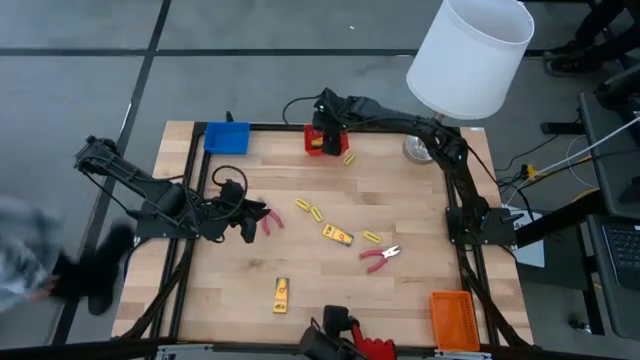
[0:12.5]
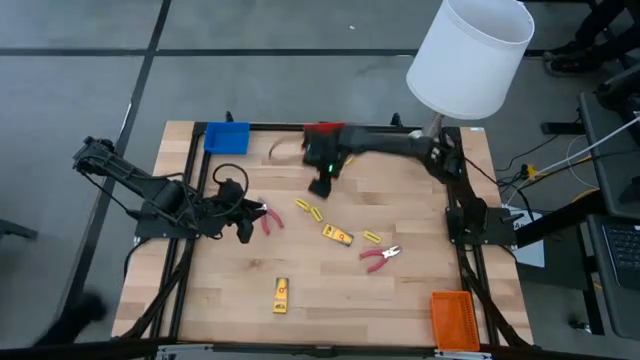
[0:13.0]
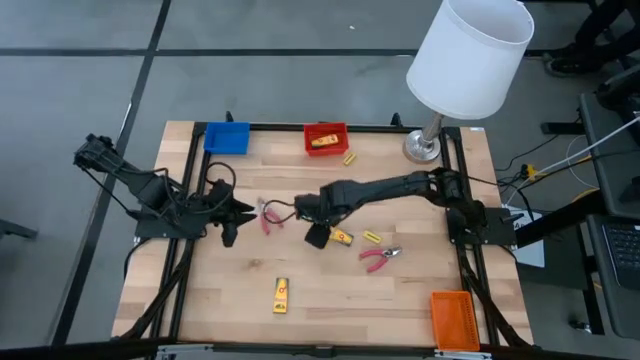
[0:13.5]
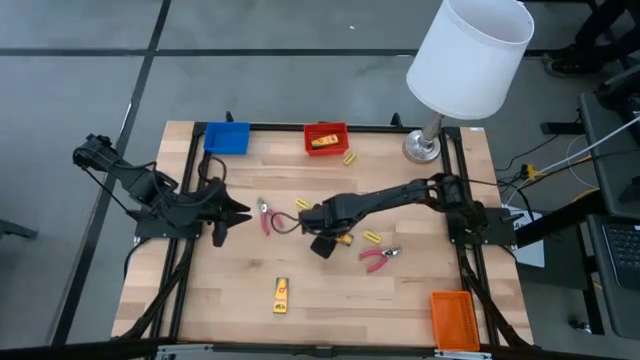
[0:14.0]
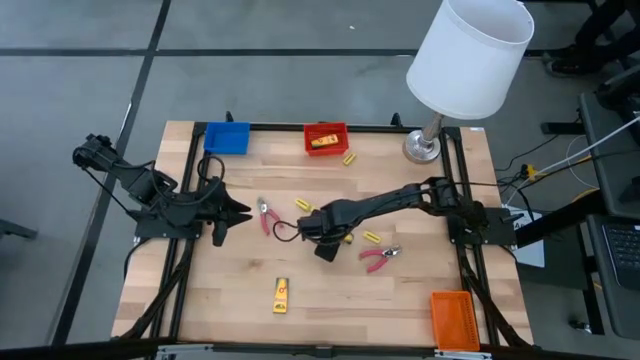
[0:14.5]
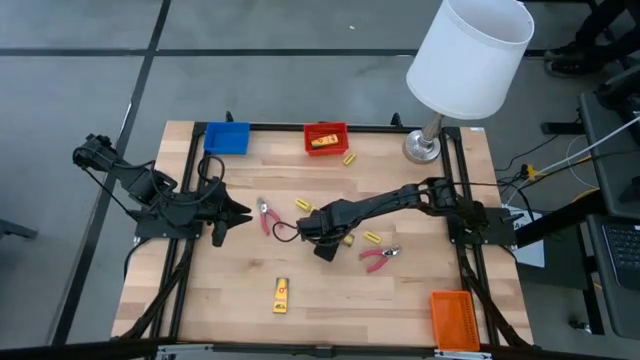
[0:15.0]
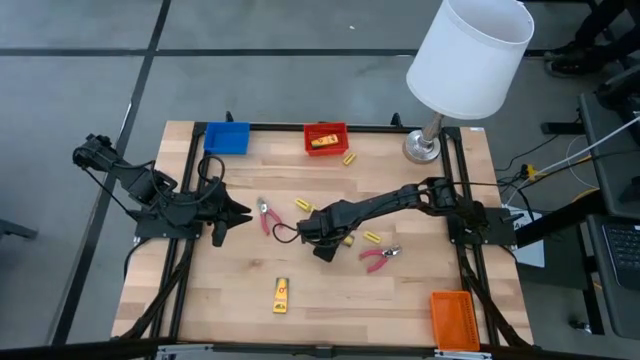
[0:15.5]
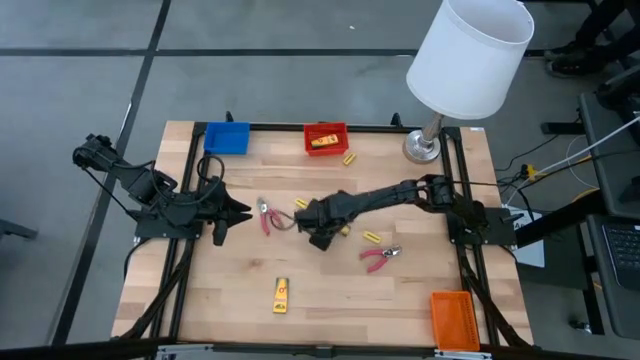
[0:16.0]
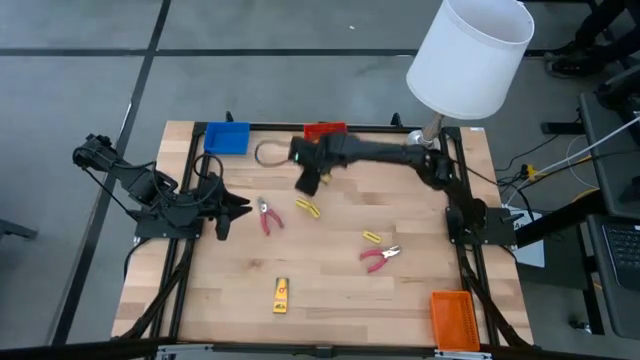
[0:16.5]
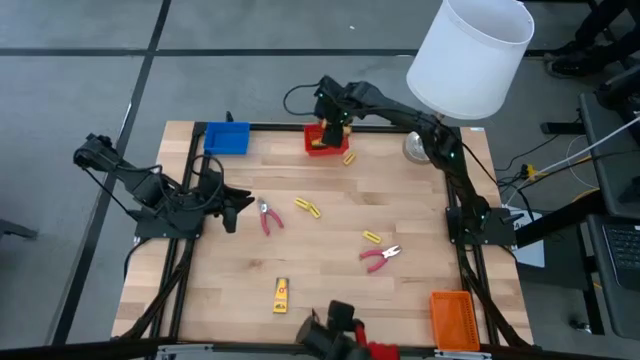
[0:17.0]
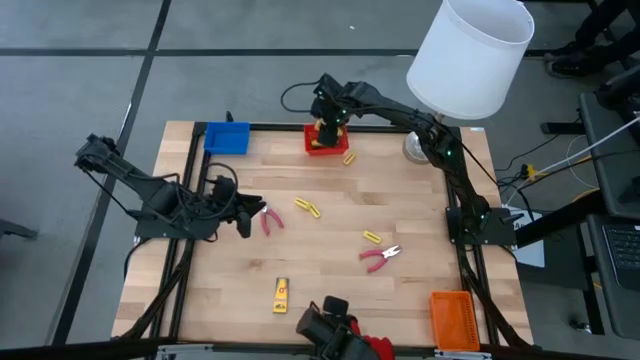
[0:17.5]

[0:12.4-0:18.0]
Task: Pick & Place School Supplies
Put the yellow crayon box into the red bin

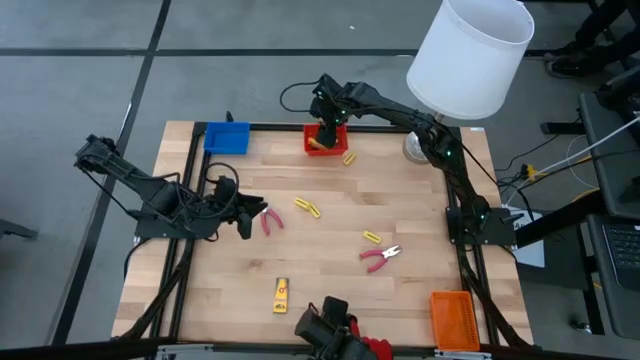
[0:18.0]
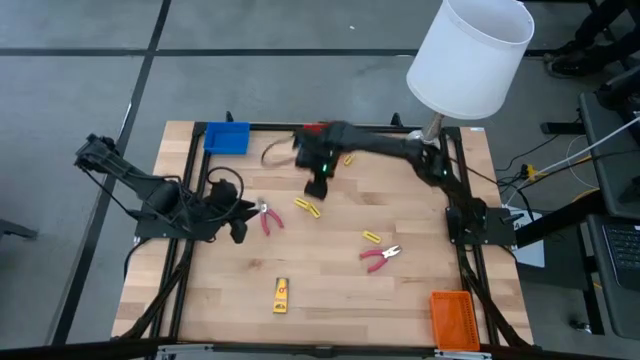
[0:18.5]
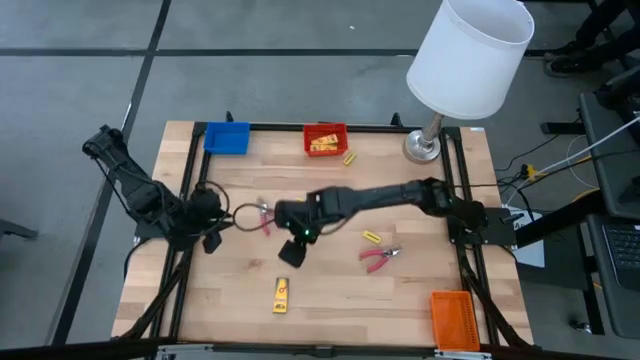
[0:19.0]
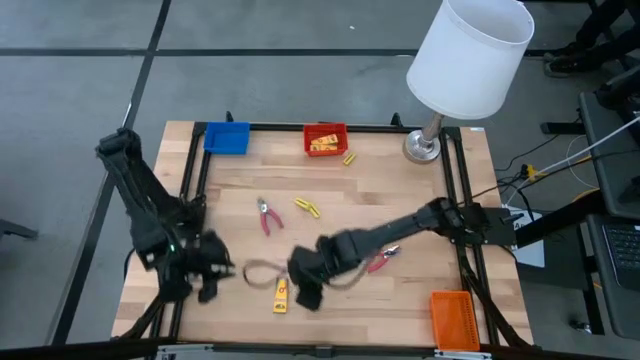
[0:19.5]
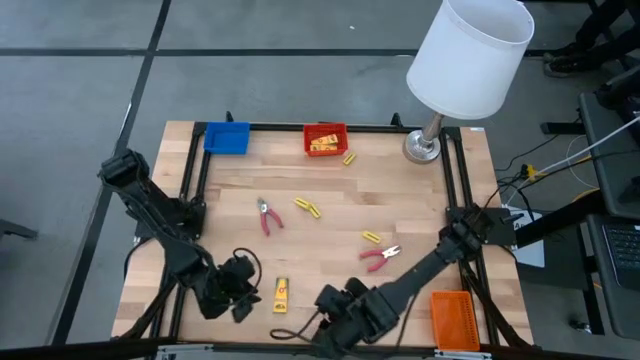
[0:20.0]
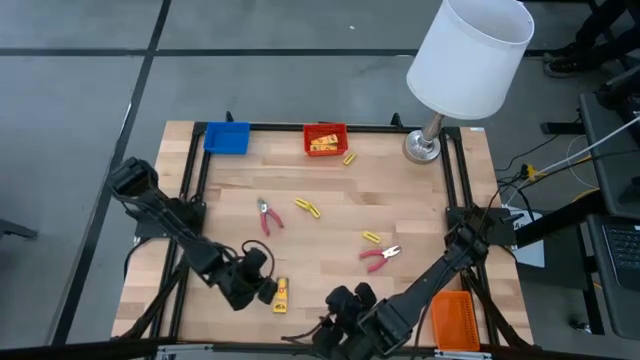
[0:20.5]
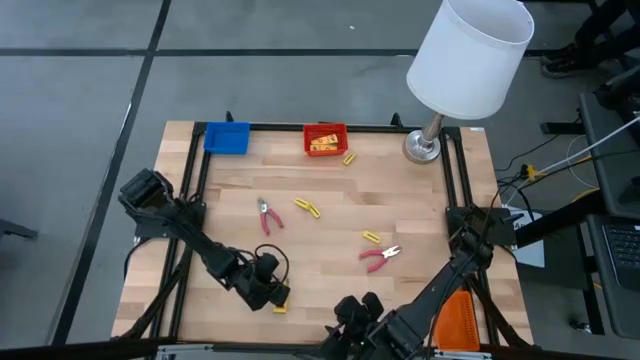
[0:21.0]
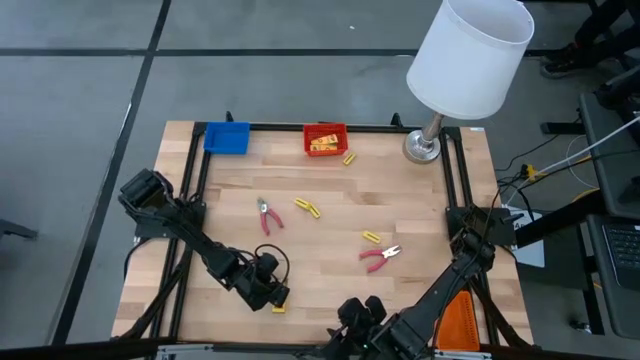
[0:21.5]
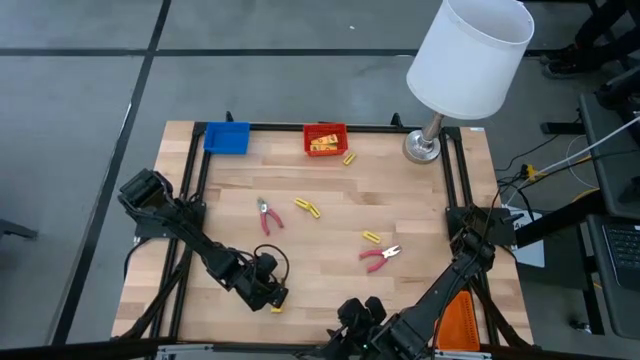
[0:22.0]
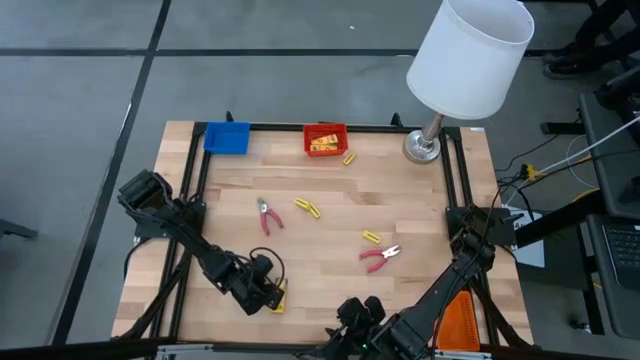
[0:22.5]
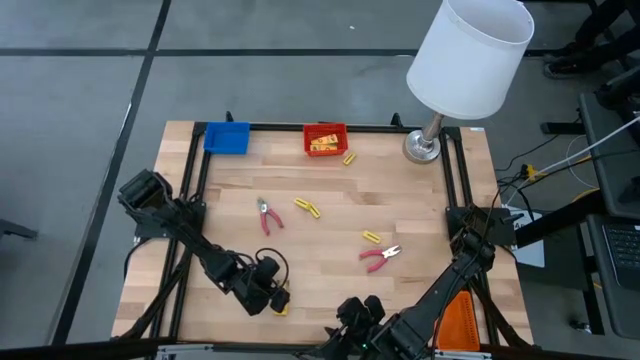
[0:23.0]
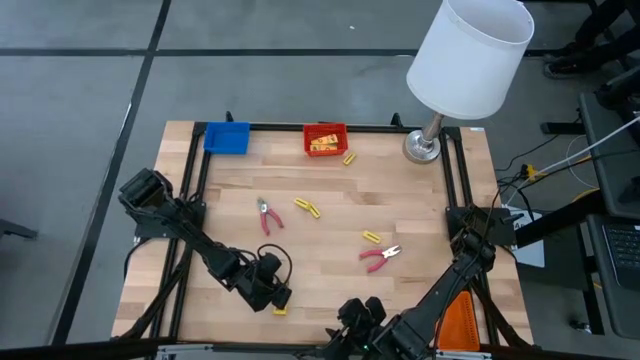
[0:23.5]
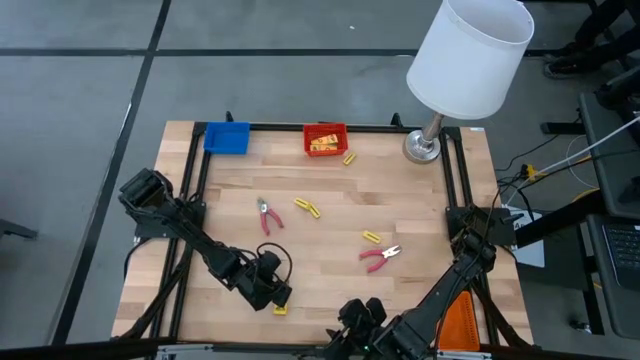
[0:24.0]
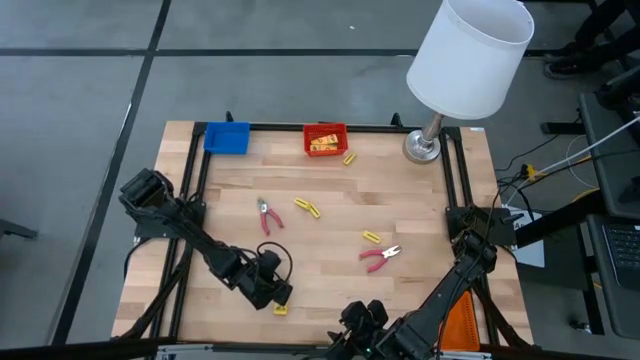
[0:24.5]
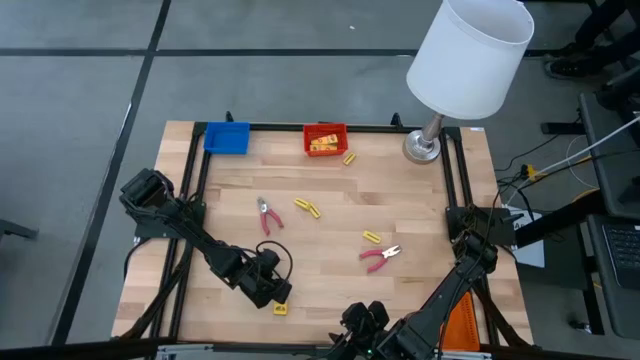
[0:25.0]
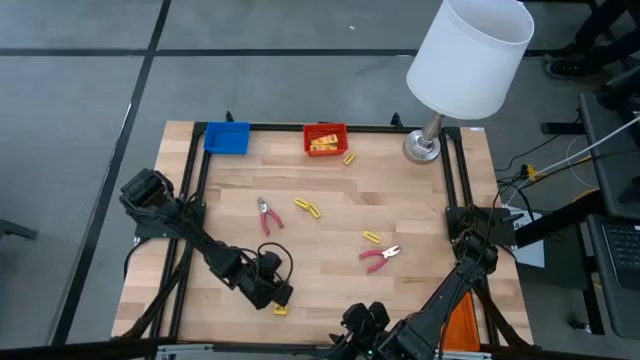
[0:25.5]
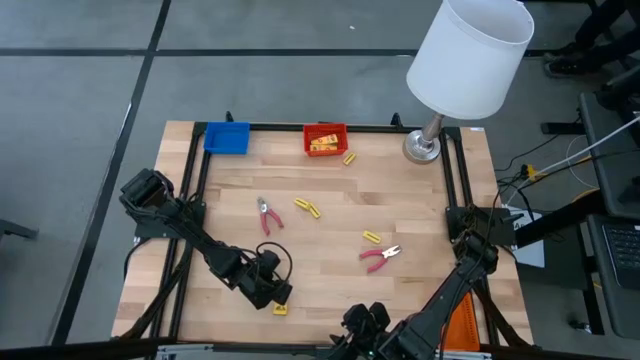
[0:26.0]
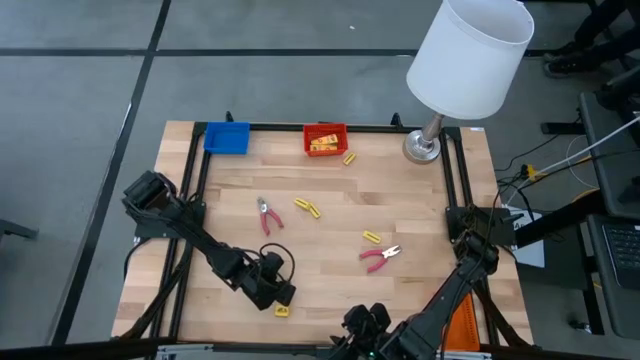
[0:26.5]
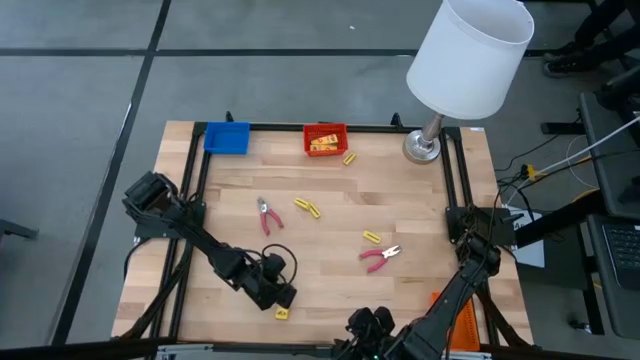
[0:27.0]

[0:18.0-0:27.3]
Put the yellow crayon box into the red bin

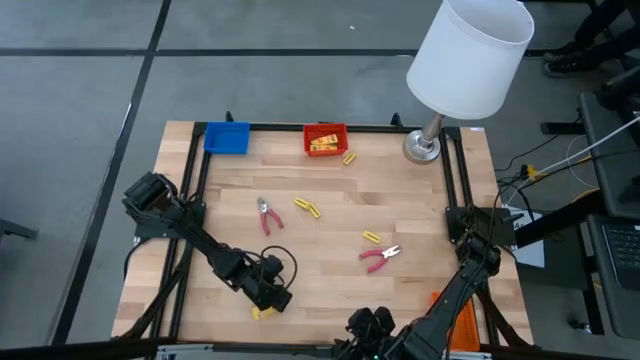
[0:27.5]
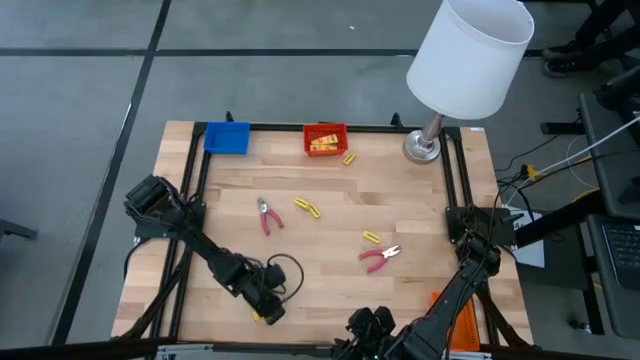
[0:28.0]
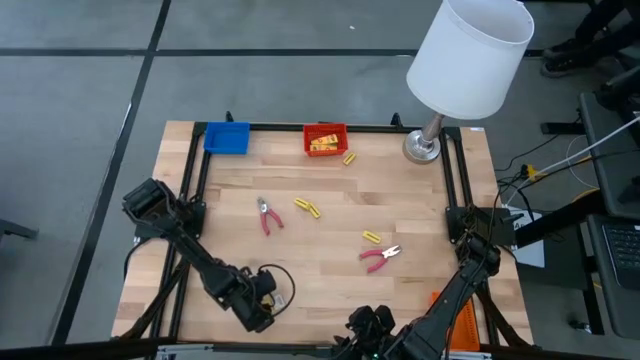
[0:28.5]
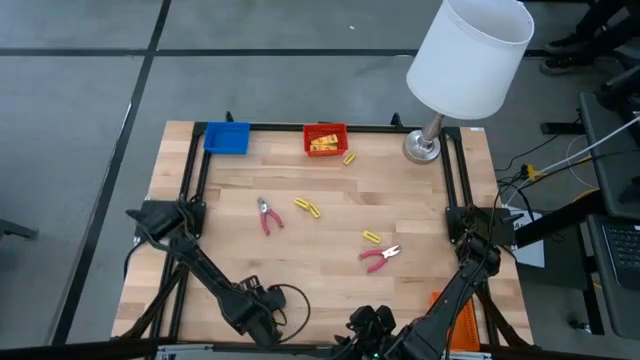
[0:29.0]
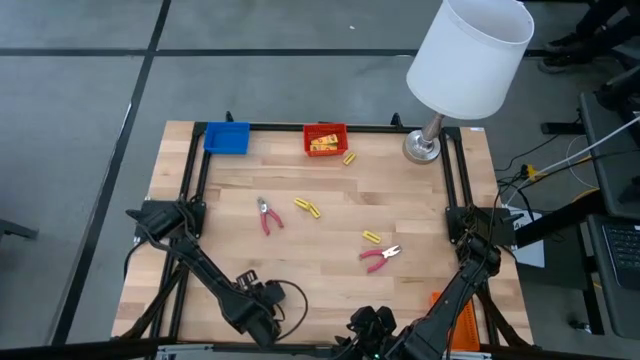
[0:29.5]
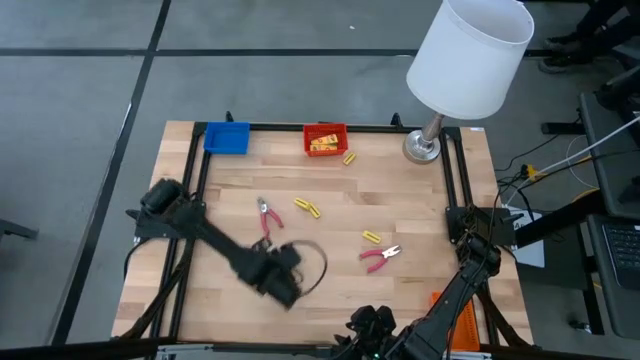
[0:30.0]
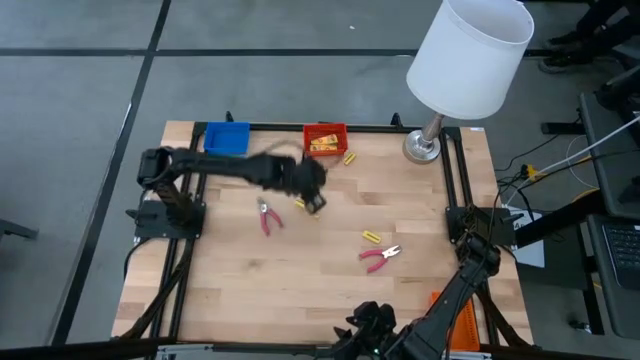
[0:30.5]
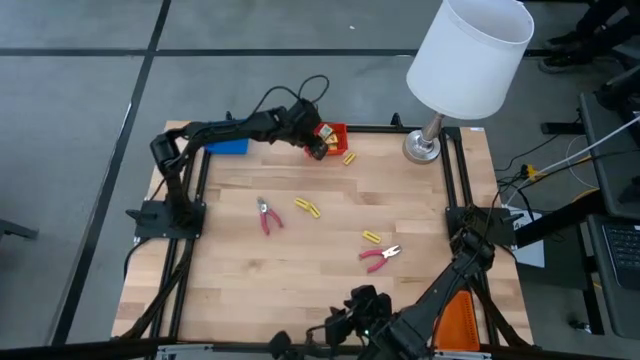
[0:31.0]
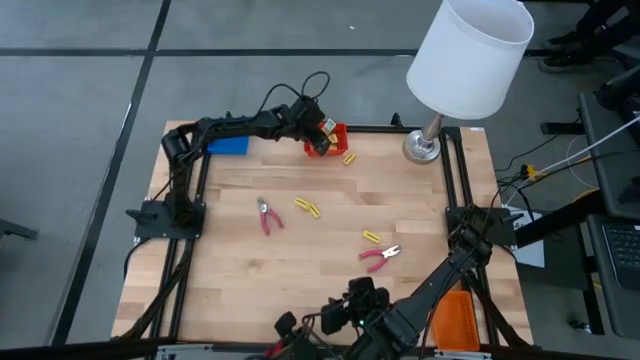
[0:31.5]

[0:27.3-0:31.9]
Put the yellow crayon box into the red bin

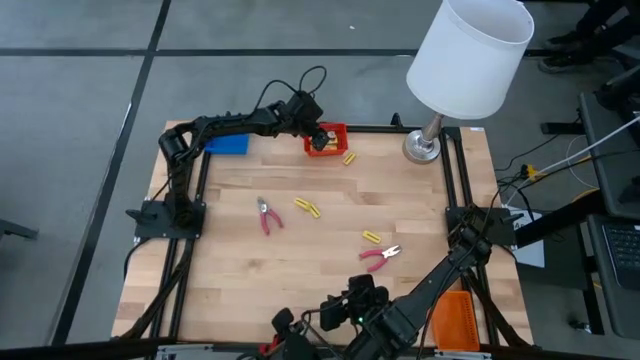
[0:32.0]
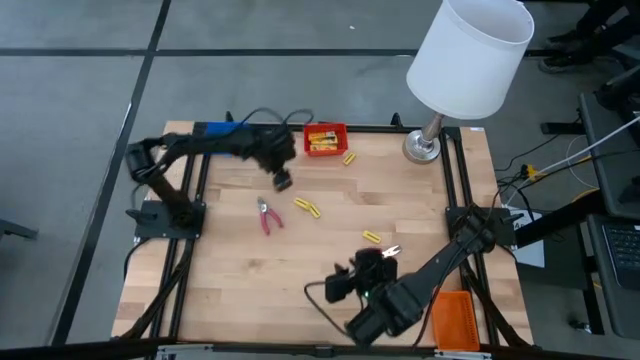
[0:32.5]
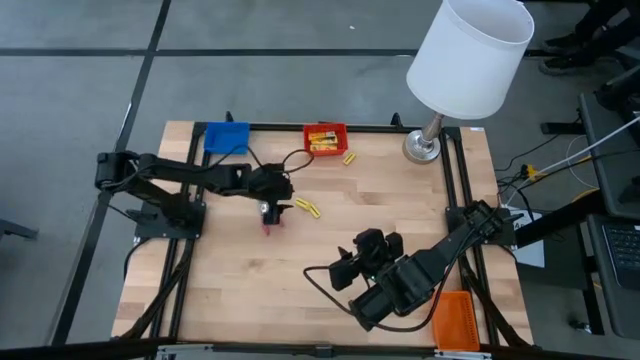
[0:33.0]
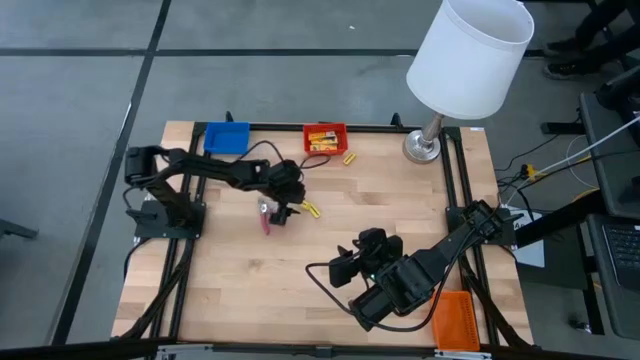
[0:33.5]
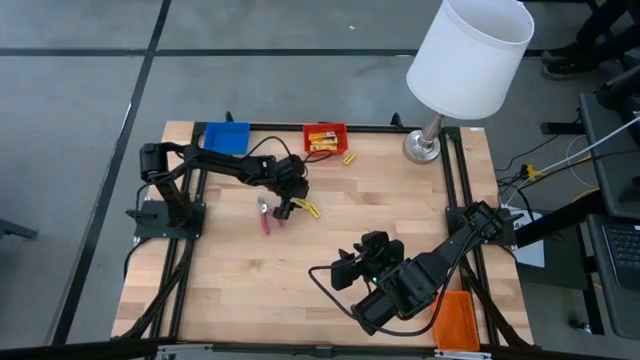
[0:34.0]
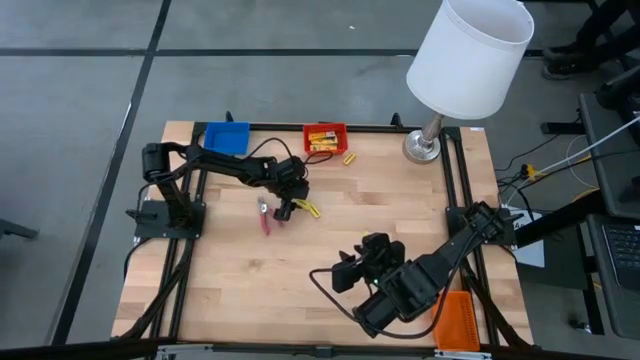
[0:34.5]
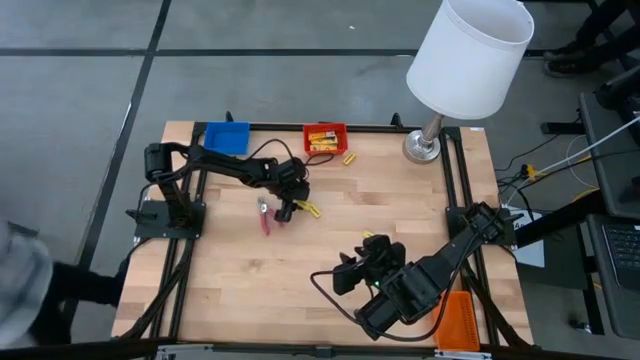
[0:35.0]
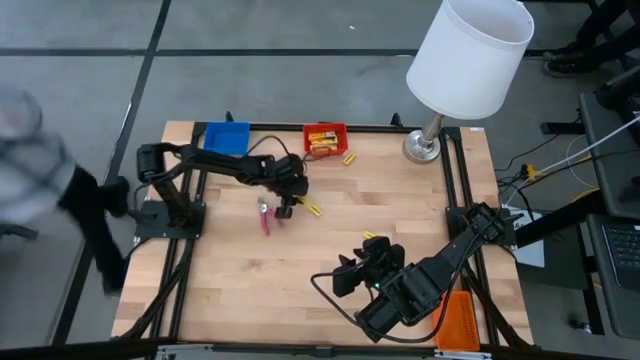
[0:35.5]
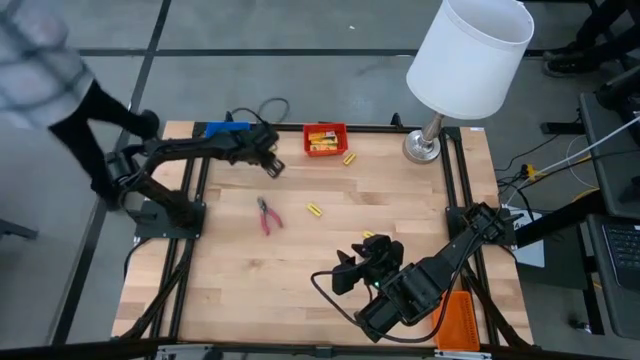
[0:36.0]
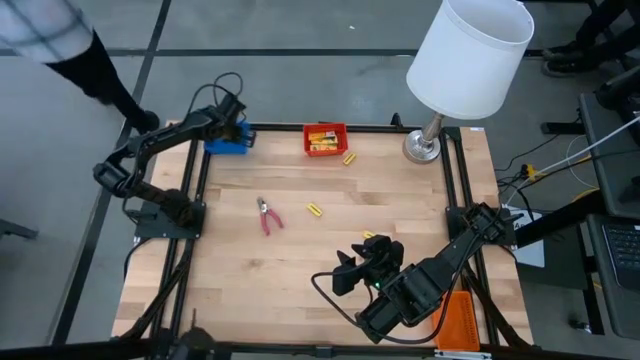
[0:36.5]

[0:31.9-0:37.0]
Put the yellow eraser into the blue bin
